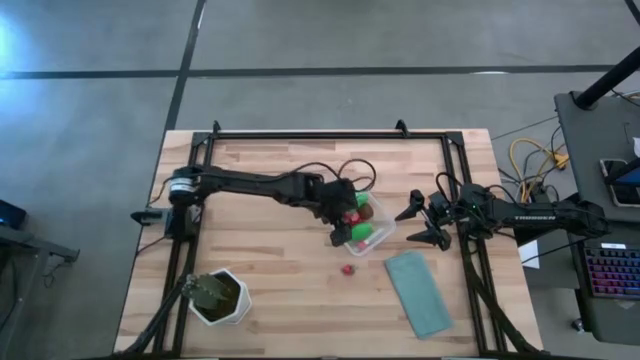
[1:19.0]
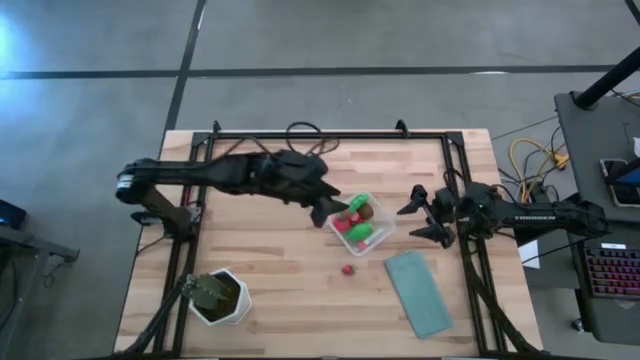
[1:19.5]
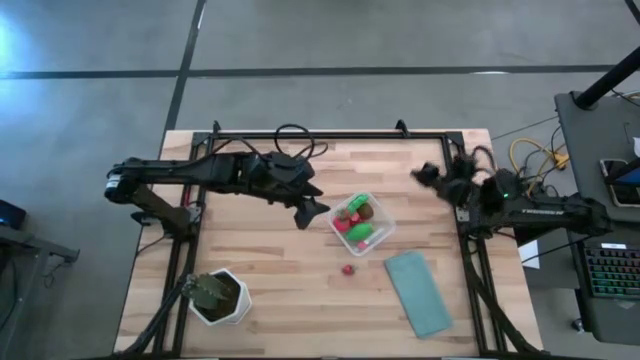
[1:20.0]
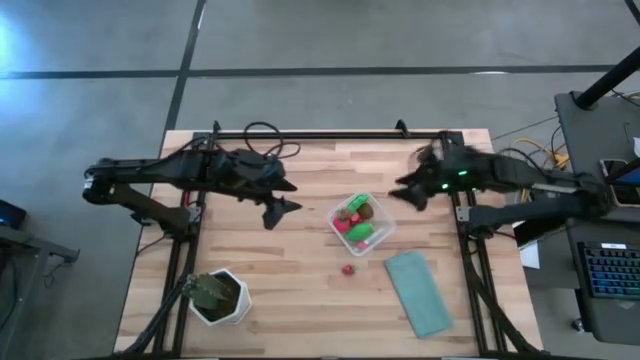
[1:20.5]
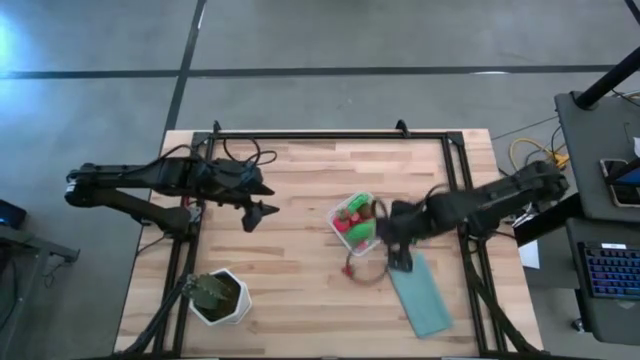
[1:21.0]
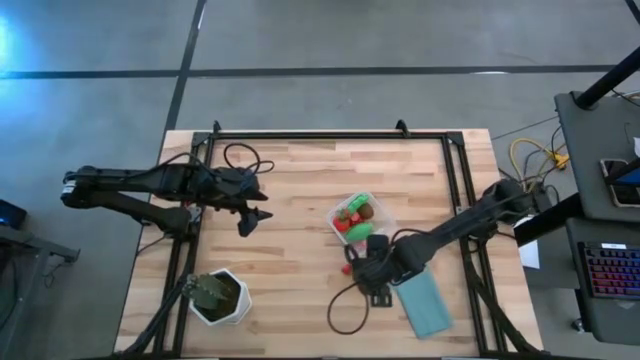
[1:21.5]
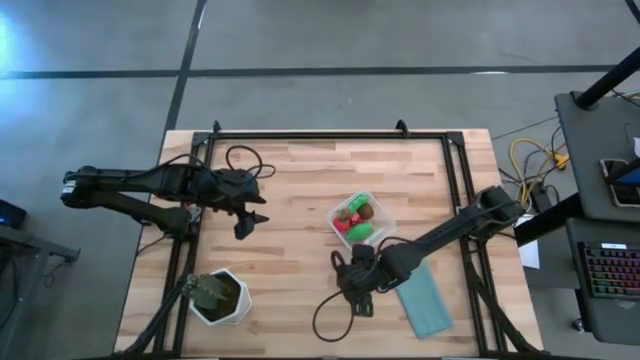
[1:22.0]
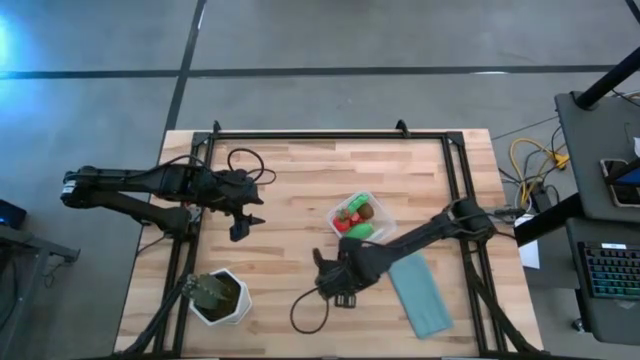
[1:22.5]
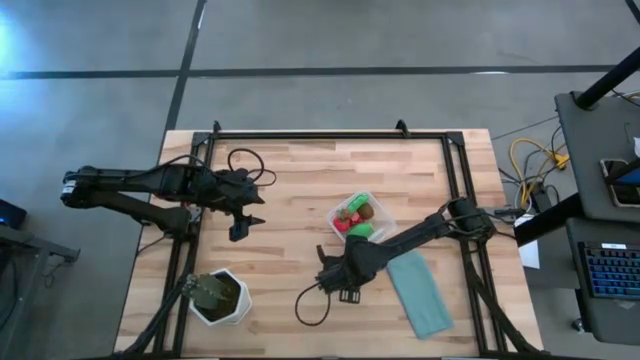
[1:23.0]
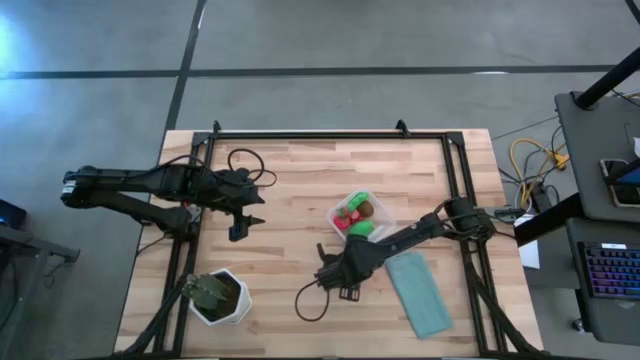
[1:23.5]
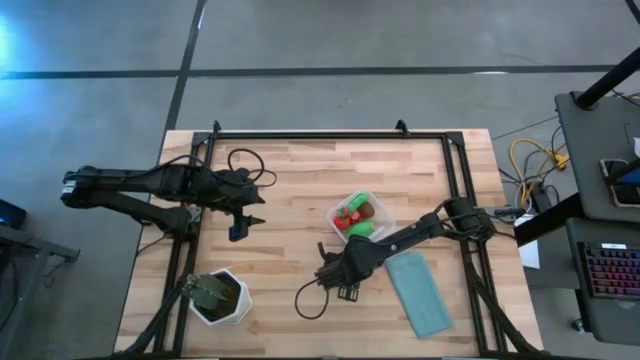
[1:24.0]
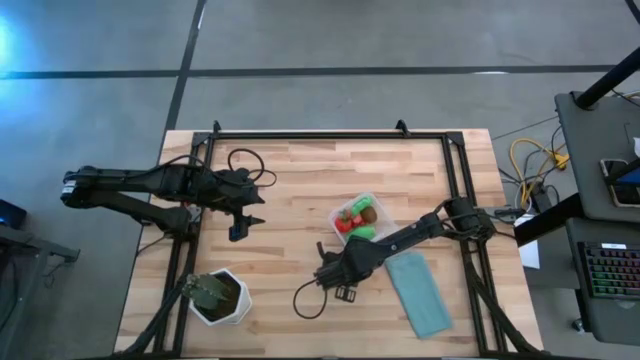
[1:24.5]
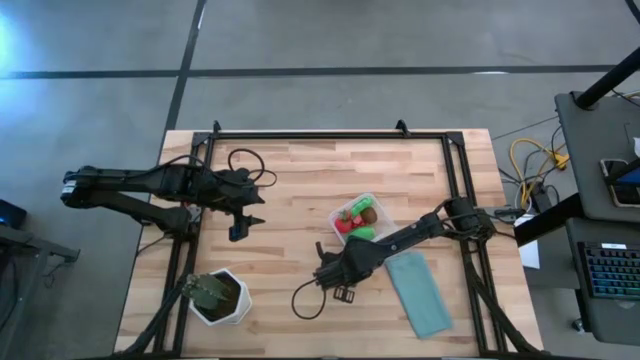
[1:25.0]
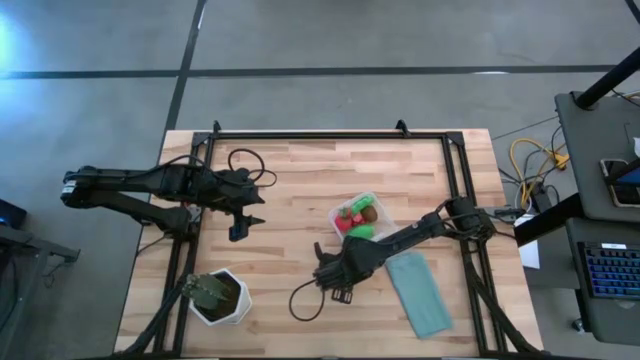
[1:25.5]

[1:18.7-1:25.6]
Task: Pick and placing Produce into tupperware
Put the red strawberry into the transparent bin

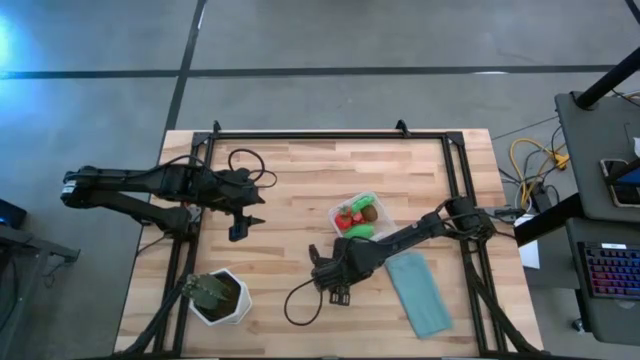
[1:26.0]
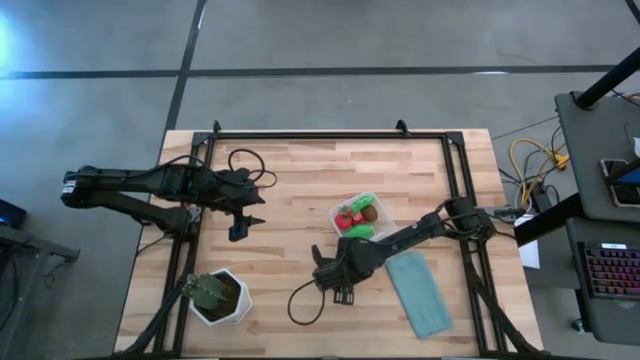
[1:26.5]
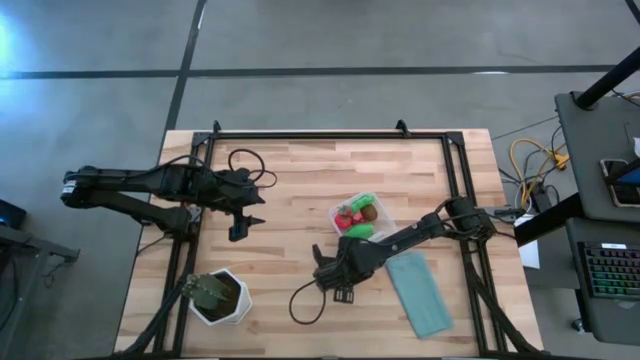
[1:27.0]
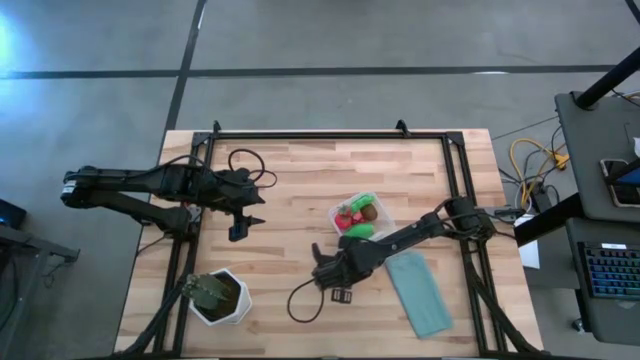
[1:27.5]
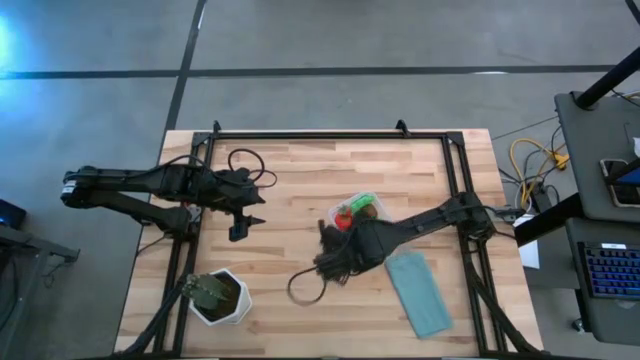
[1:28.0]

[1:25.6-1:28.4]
Put the red cherry into the transparent bin

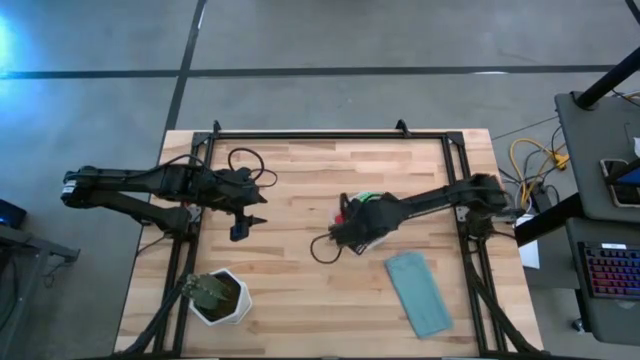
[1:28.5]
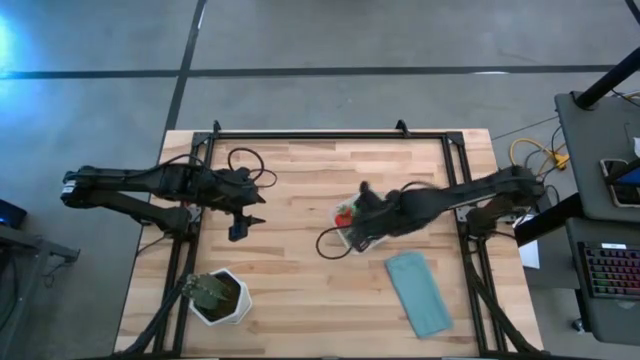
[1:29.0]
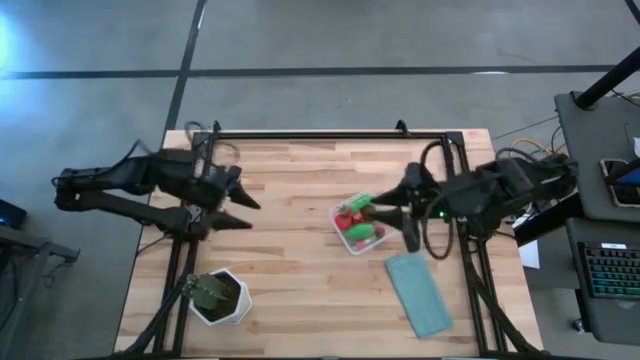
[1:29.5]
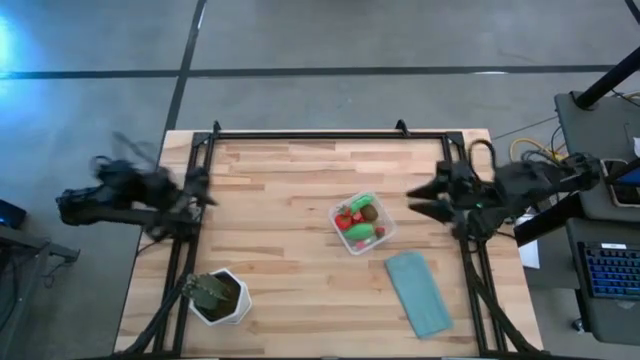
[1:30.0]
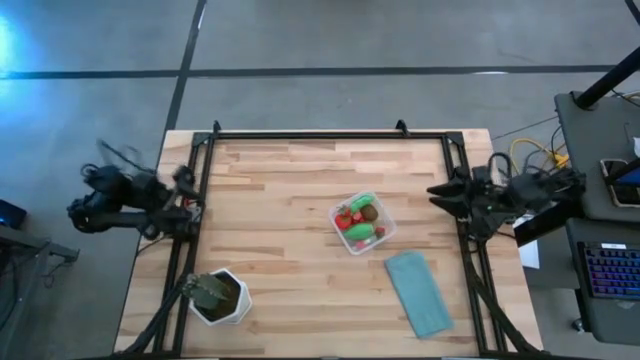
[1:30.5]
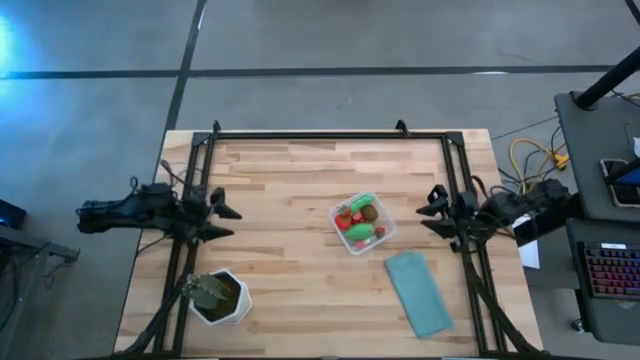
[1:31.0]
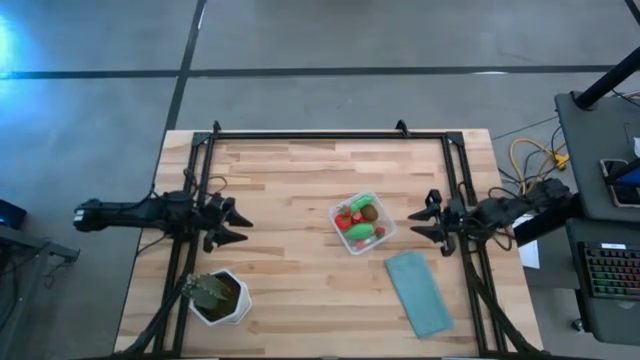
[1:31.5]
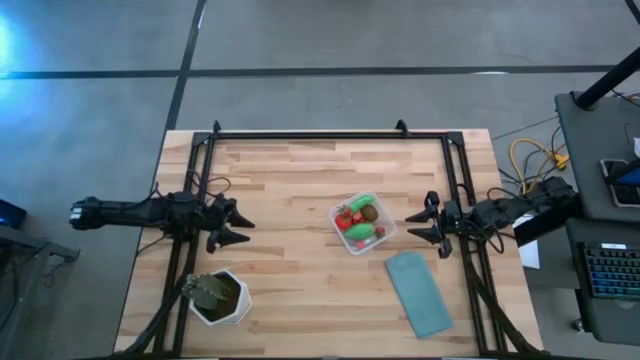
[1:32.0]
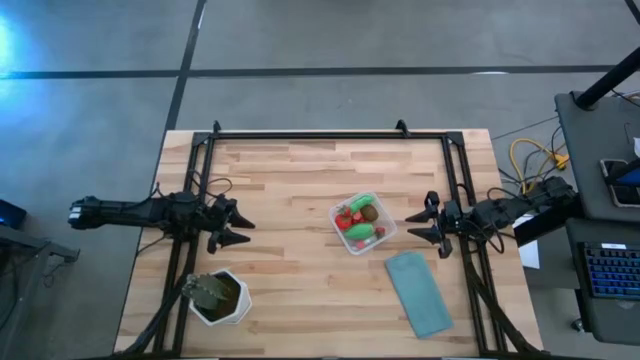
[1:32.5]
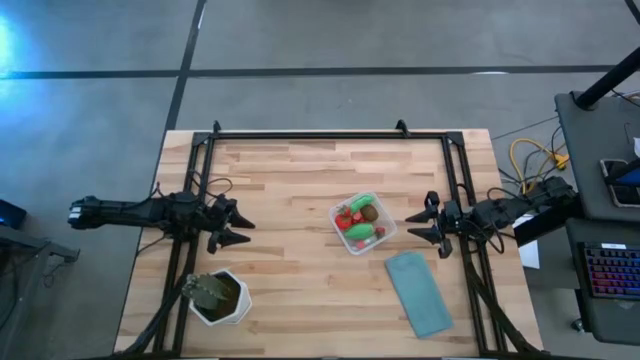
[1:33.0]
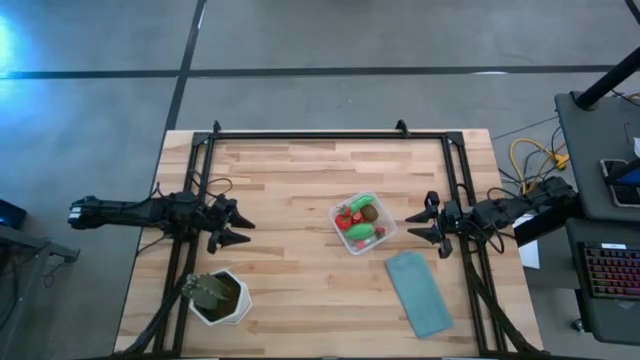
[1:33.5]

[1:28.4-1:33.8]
Return to Home Position

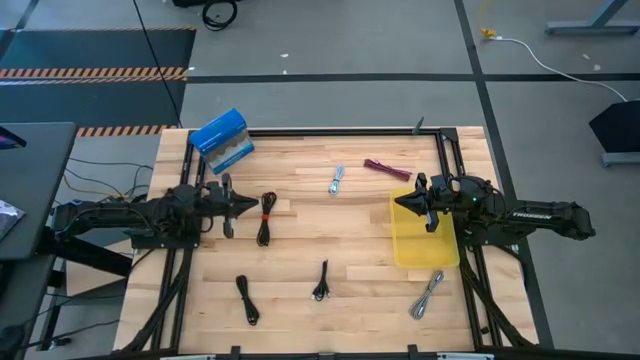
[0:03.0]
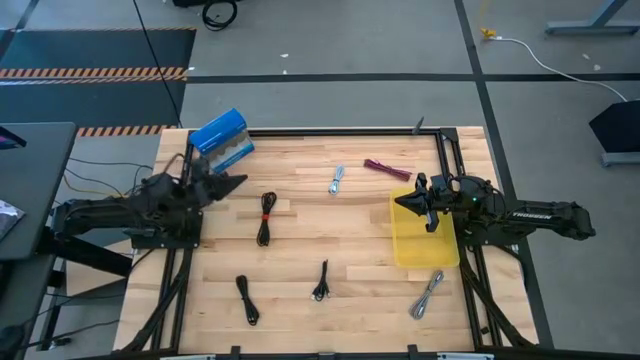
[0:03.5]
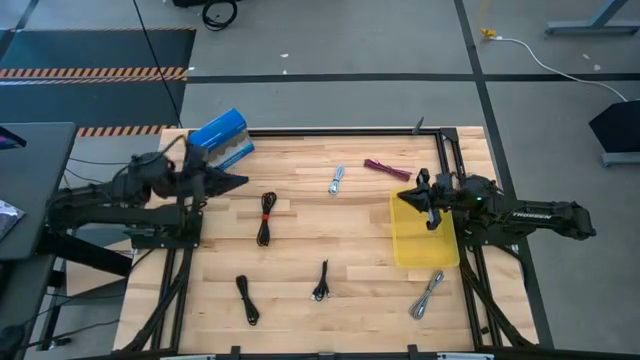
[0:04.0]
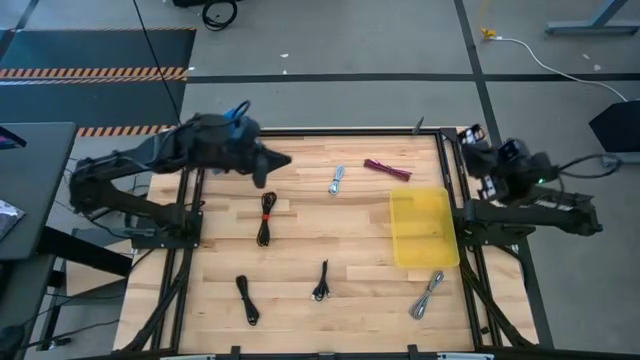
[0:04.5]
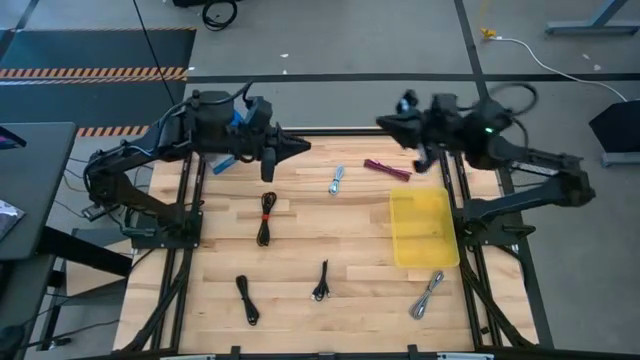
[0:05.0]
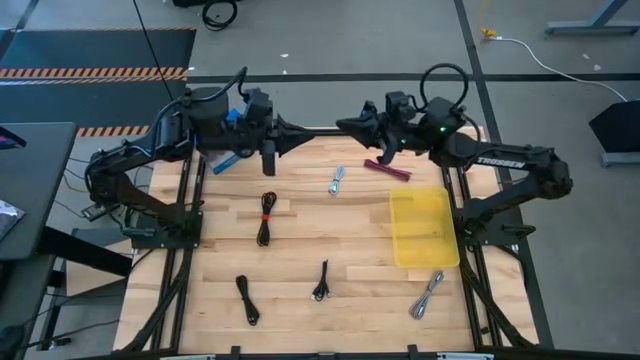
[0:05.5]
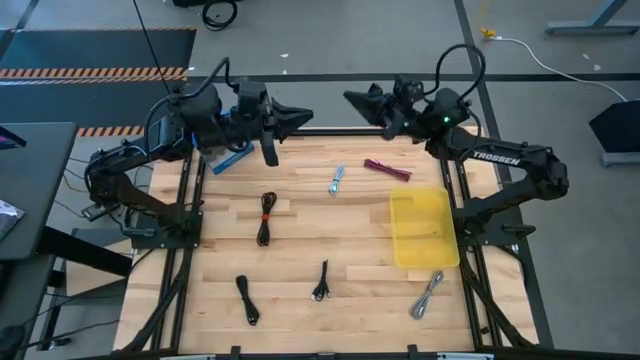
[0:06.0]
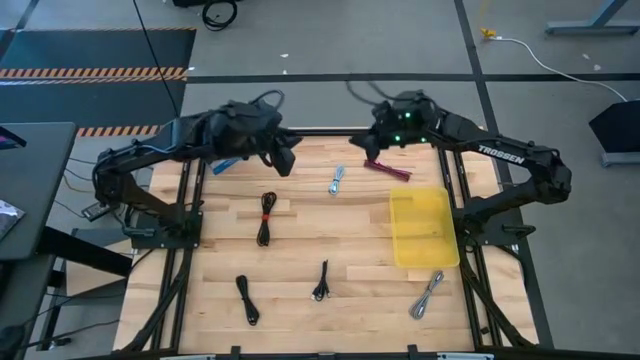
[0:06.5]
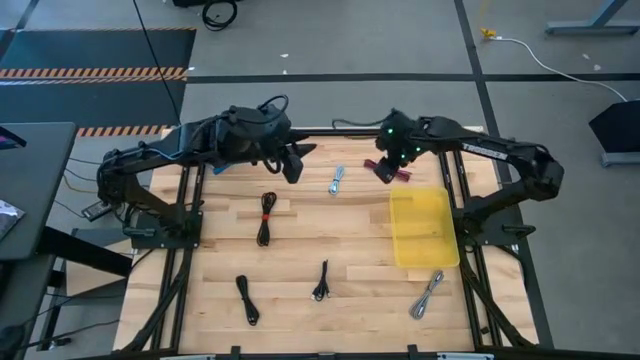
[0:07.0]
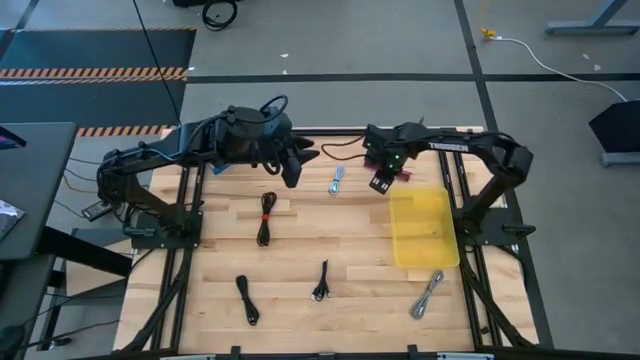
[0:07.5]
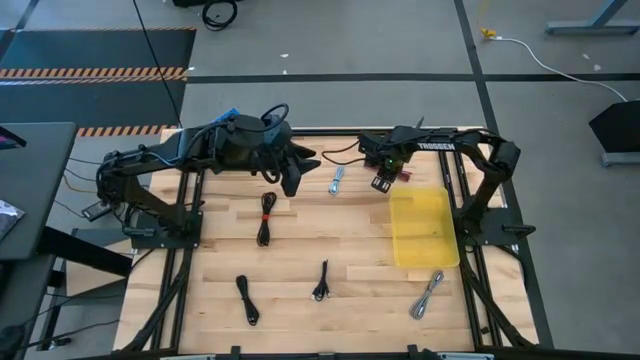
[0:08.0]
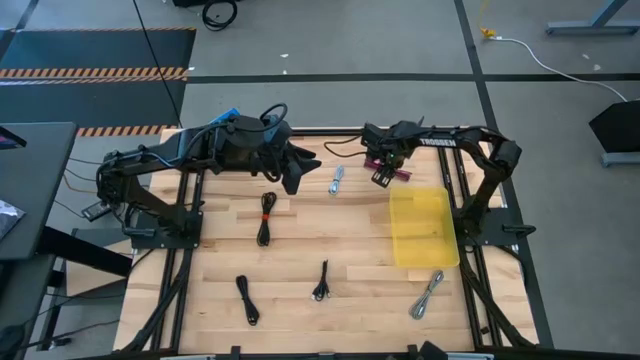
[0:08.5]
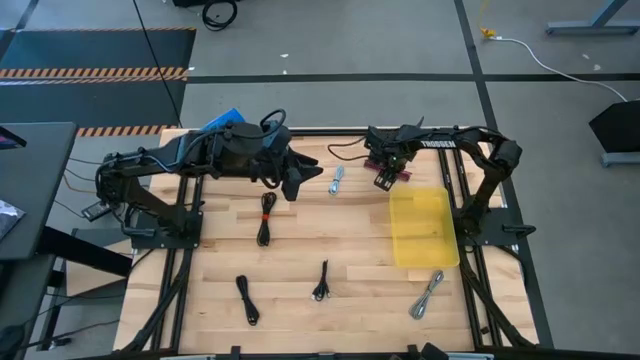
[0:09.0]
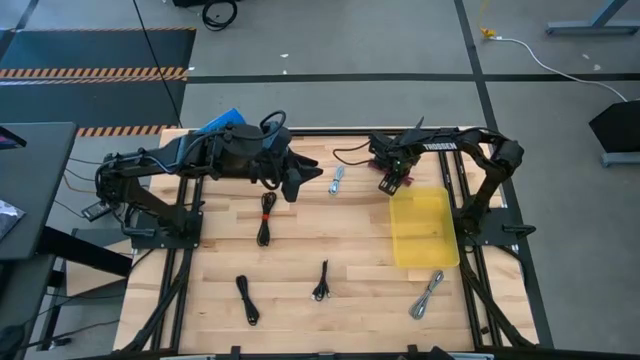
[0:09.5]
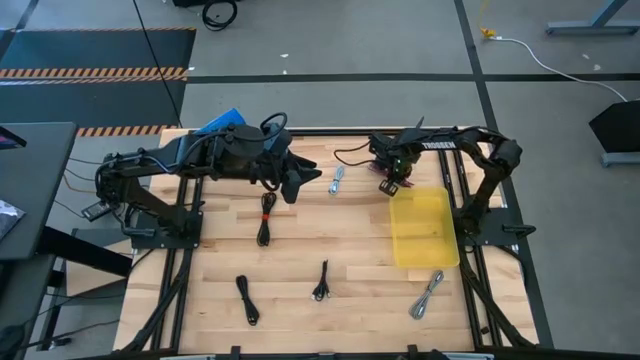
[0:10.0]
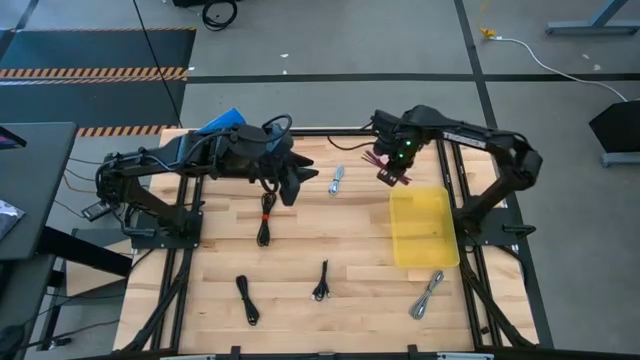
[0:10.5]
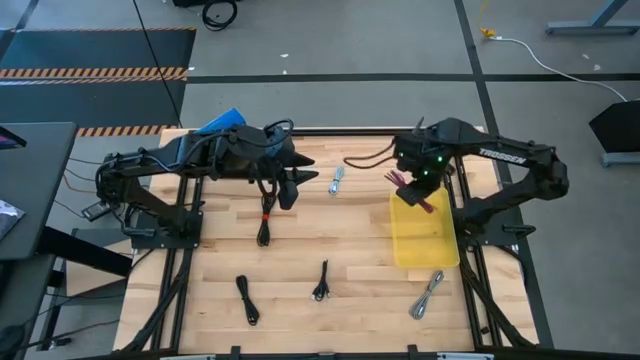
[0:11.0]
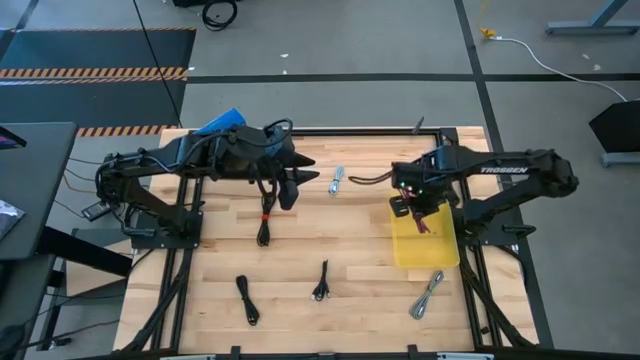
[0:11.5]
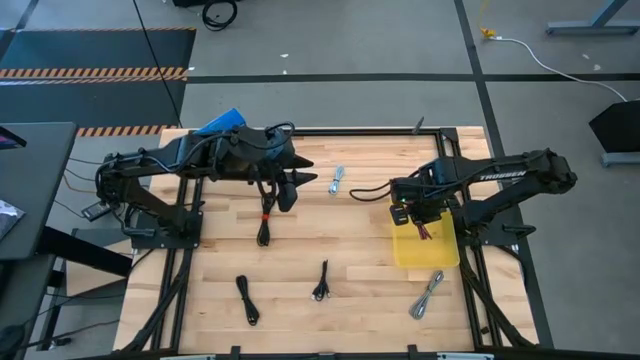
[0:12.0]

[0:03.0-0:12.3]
Task: Pick and place USB-C Cables
Put the pink charger cable into the yellow bin
